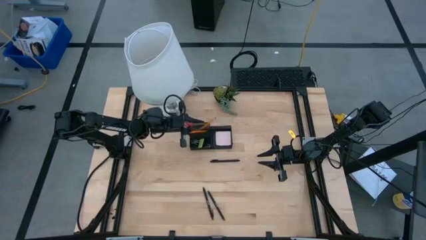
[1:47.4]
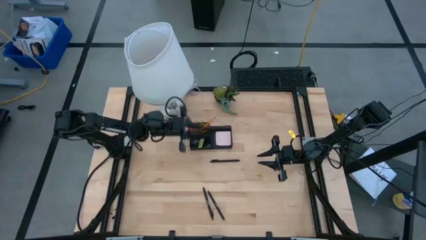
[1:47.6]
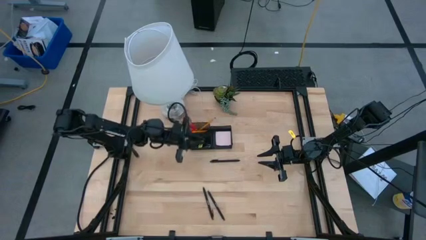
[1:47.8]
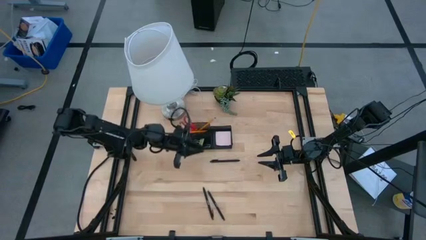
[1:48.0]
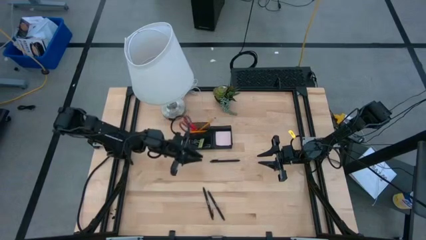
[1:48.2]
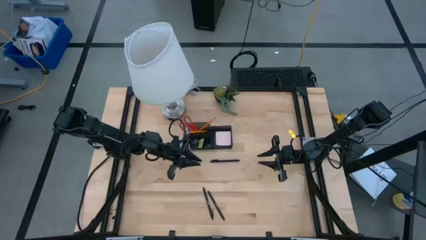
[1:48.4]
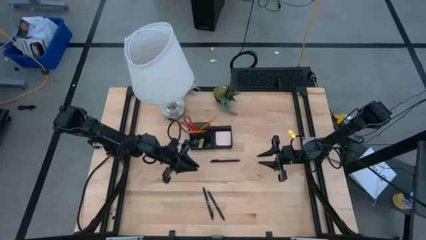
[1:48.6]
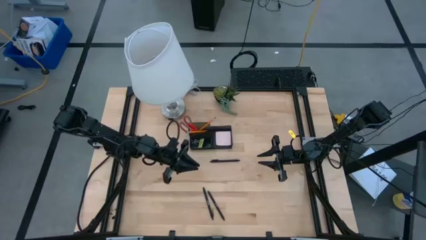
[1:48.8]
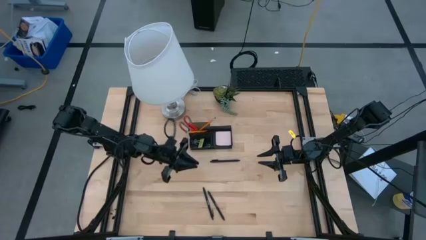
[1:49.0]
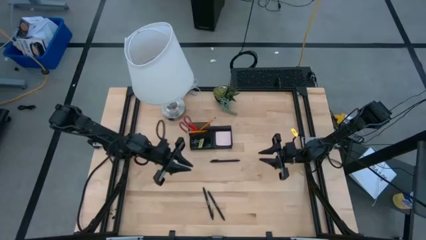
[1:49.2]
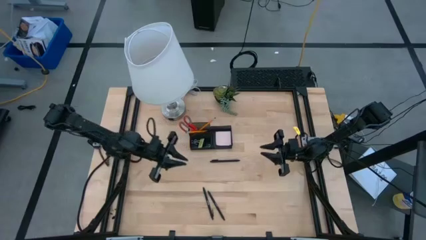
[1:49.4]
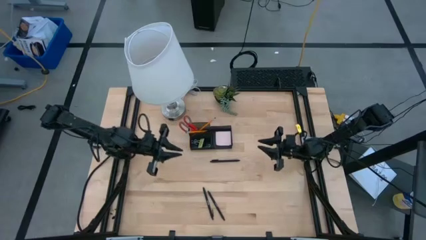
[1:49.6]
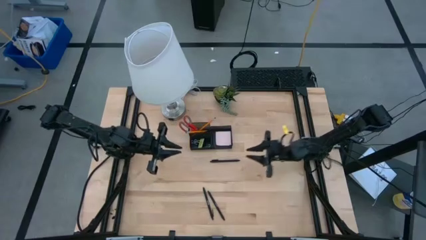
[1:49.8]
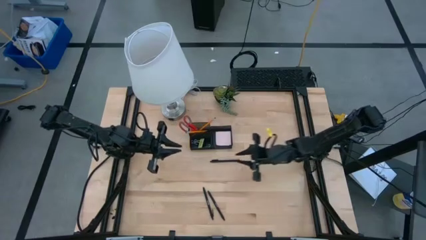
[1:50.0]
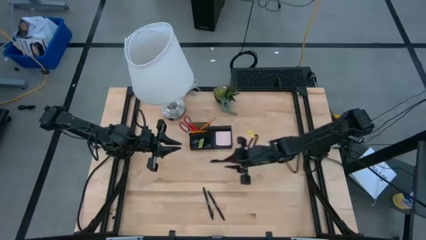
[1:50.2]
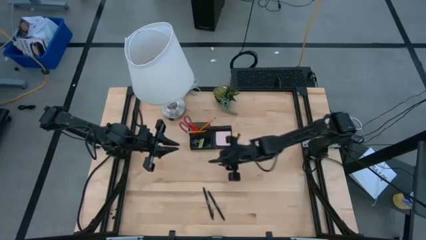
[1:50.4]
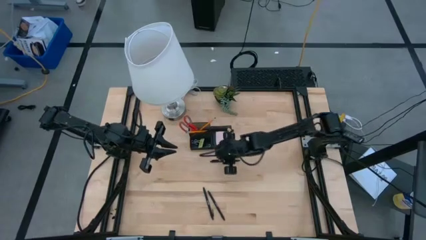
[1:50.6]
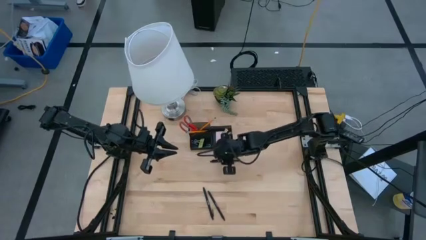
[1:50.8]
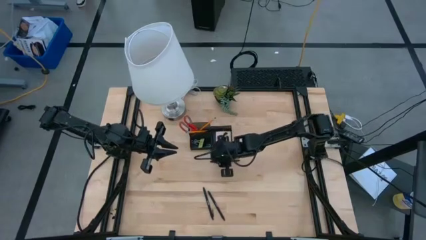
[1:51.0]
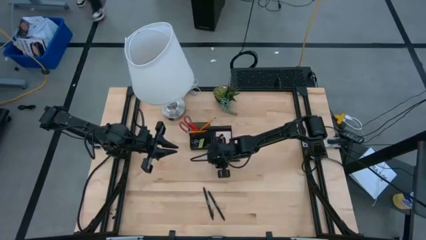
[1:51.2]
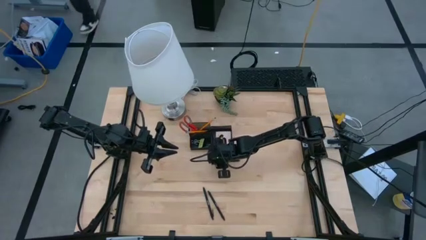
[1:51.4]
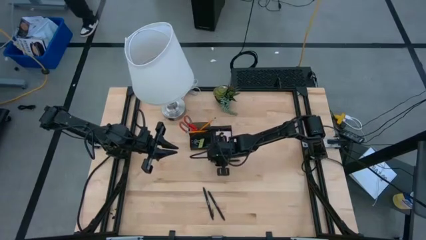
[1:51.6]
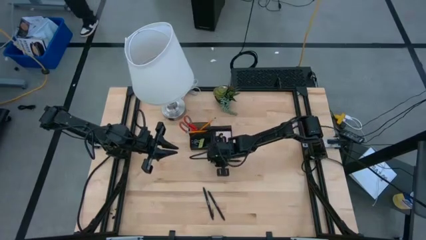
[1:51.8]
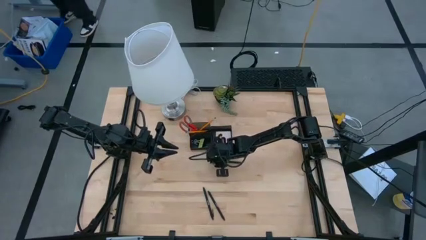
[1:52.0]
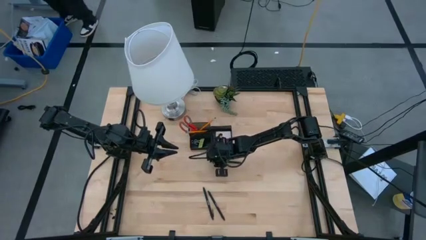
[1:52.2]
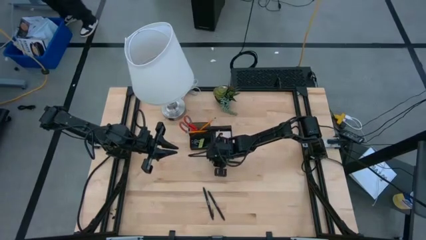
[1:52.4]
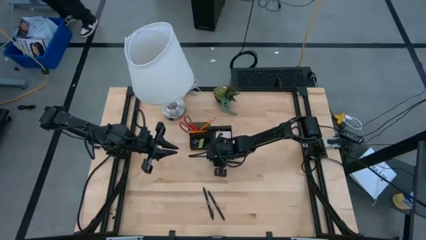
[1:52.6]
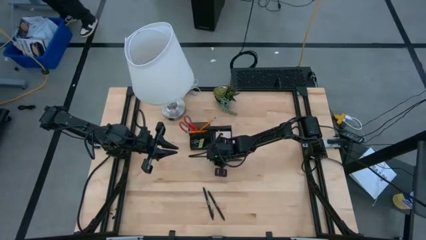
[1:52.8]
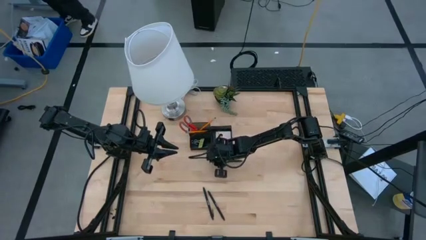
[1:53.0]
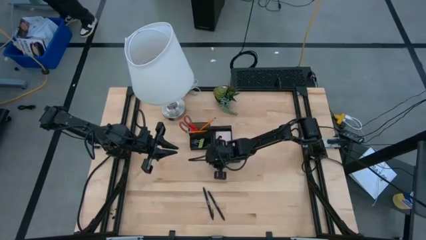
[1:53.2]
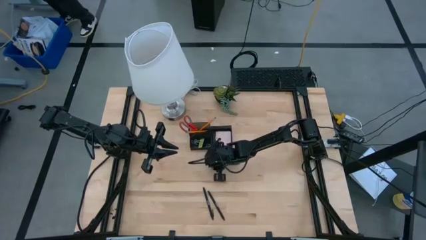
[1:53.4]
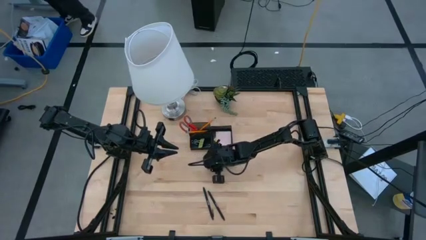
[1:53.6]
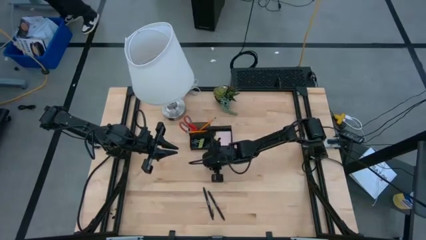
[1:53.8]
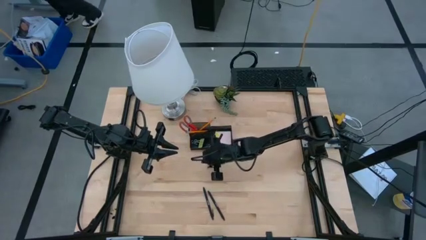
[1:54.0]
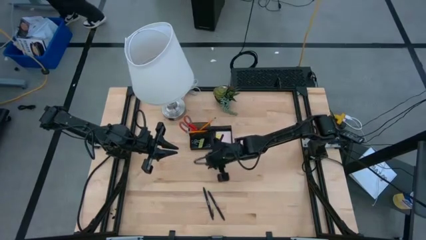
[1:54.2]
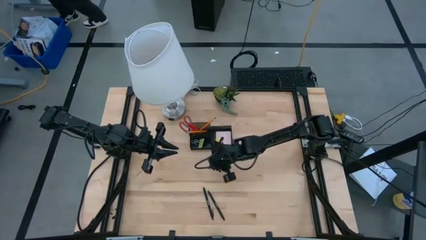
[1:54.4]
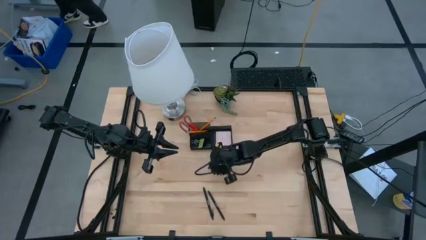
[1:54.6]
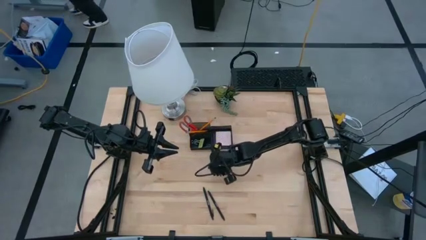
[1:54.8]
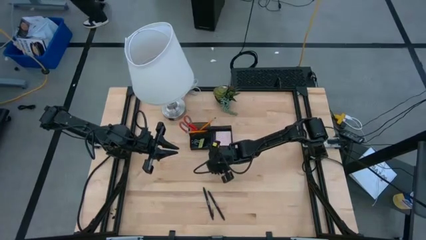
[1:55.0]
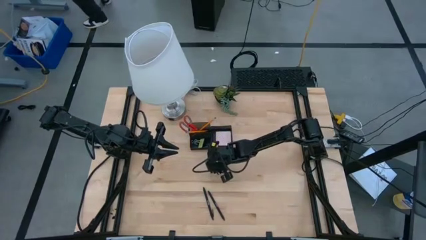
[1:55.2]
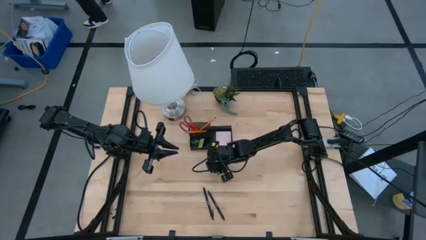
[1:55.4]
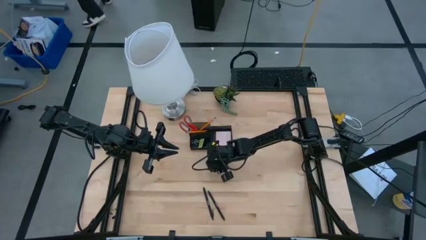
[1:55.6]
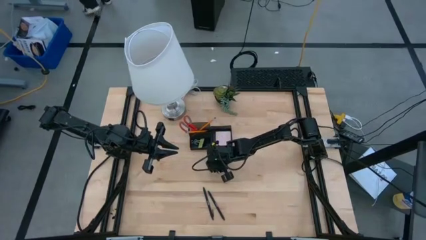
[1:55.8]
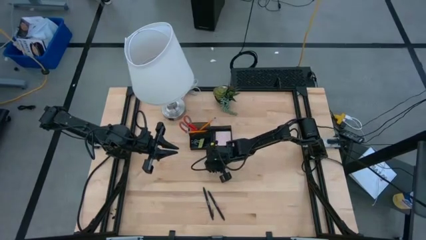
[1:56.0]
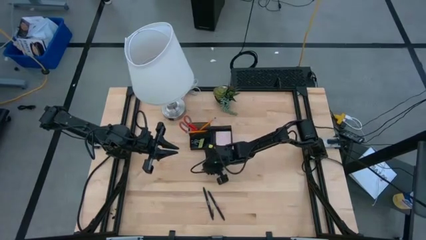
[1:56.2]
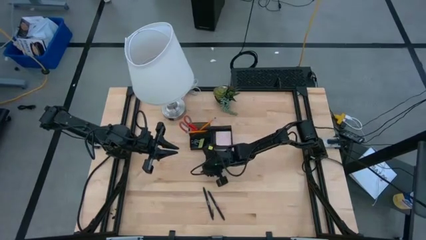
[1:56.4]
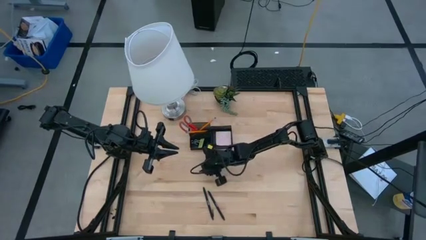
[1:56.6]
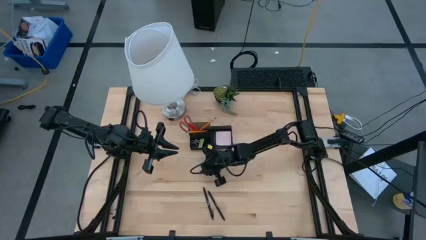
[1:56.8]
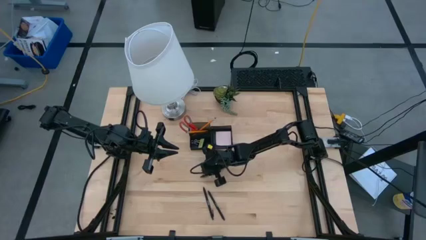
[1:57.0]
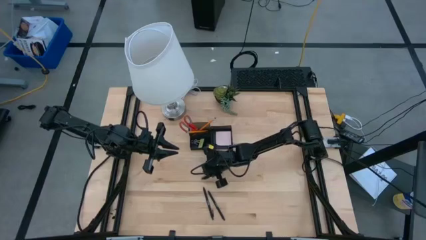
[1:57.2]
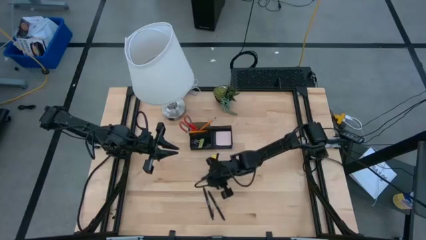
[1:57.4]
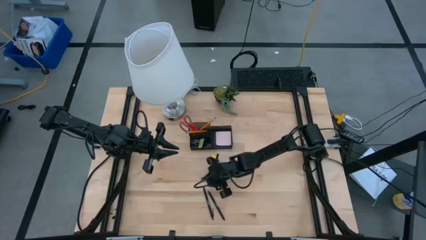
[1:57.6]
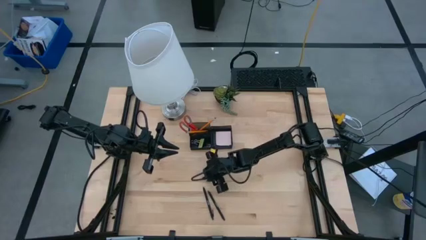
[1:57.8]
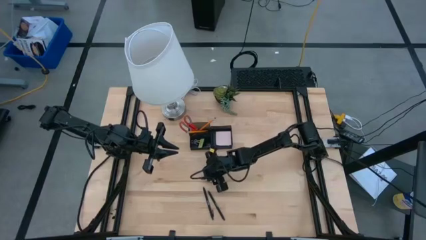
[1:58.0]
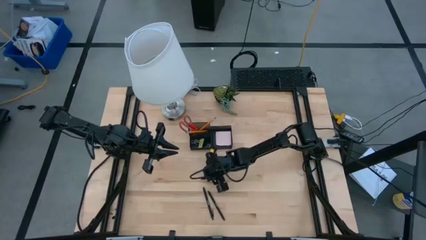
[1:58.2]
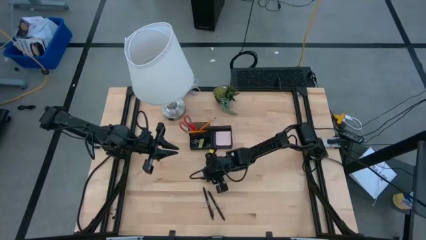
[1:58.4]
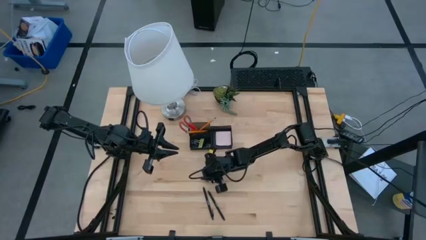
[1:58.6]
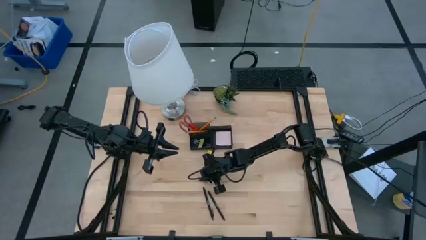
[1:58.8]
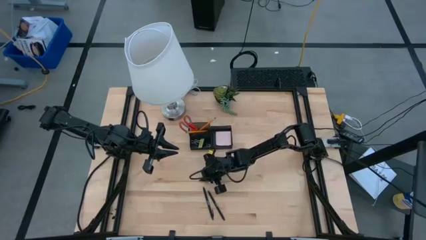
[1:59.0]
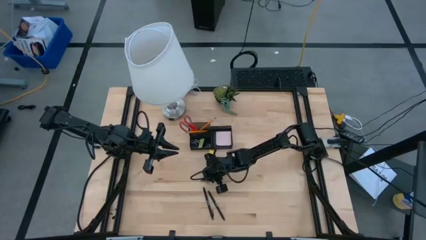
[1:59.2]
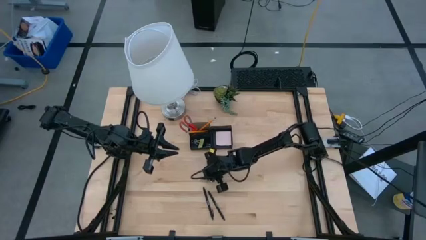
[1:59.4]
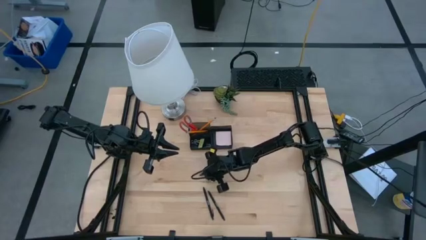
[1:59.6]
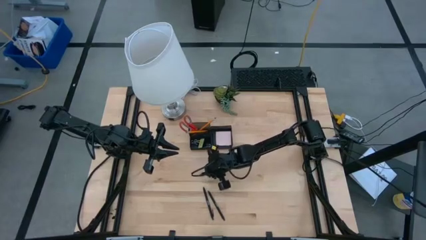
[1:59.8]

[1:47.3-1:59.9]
Task: Pick and place office supplies into organizer
Put the top black pen into the black desk organizer

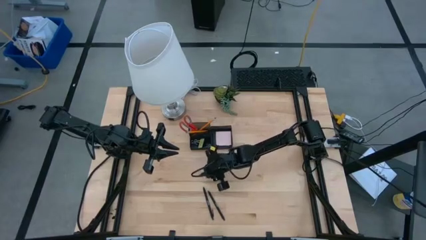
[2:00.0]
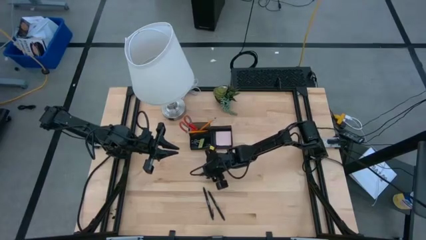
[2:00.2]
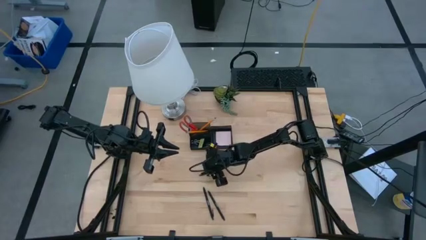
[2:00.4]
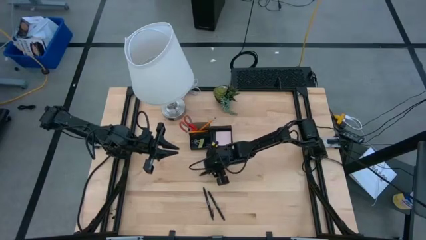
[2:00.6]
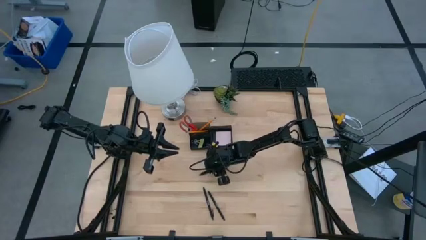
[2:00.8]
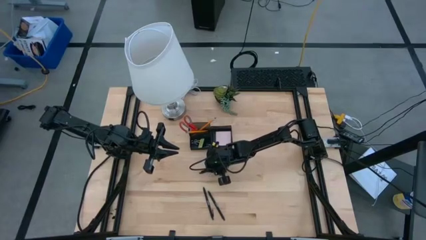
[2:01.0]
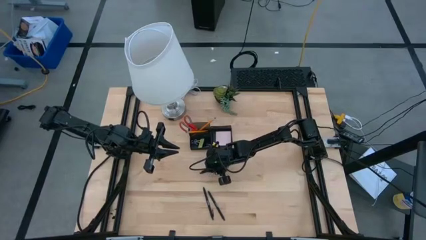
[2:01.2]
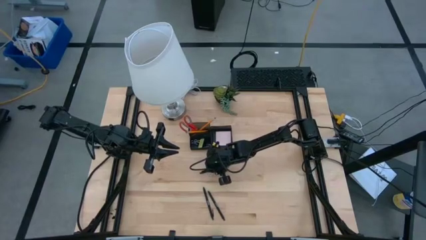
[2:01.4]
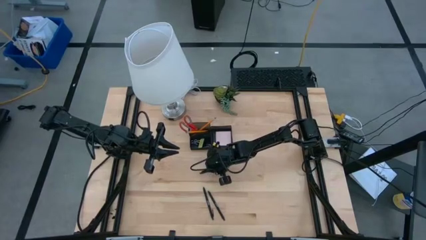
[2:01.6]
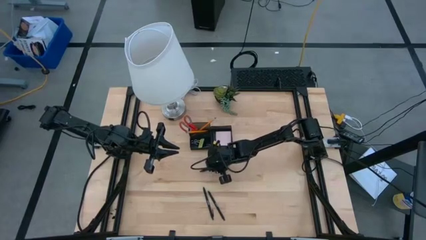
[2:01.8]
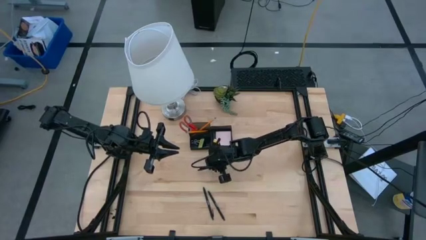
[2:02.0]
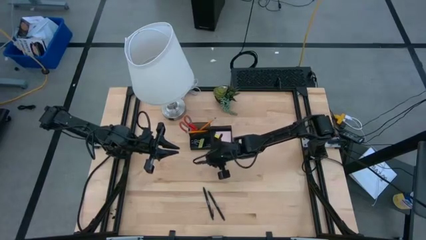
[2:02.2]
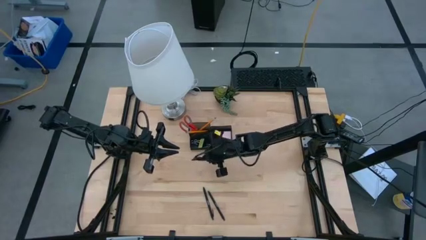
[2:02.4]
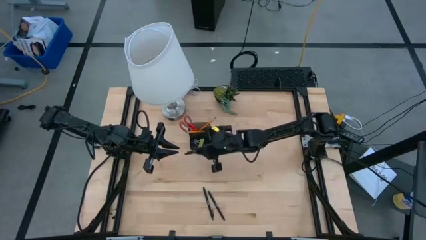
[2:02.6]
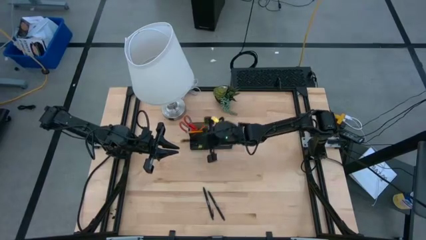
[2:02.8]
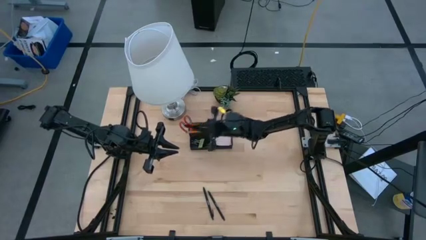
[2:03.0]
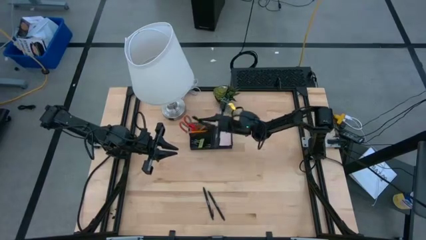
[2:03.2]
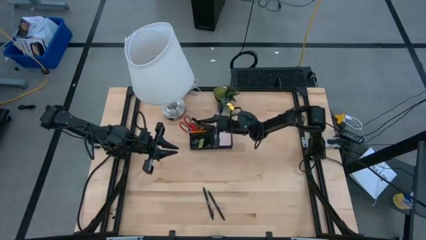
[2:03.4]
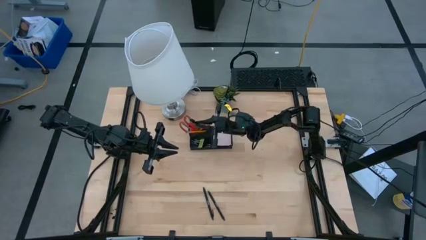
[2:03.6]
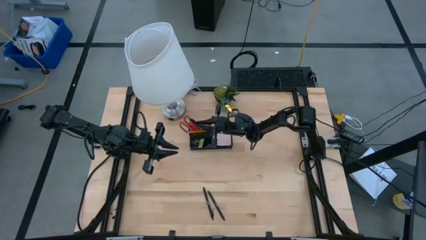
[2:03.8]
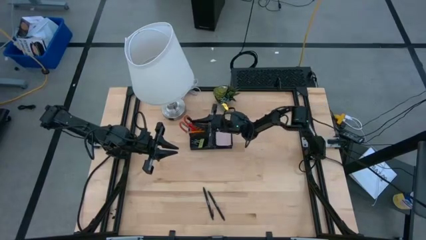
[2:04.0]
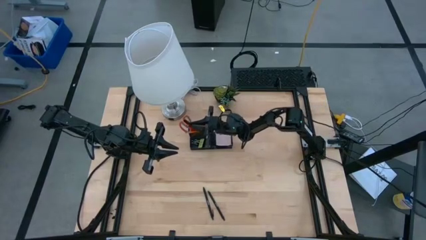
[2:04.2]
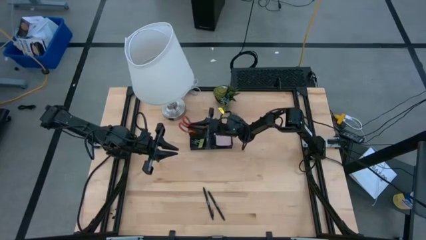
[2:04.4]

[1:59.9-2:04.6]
Put the top black pen into the black desk organizer
